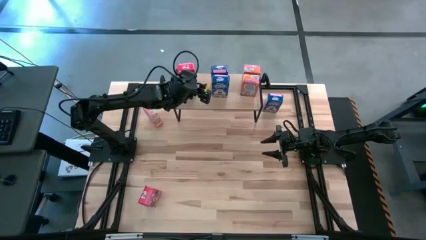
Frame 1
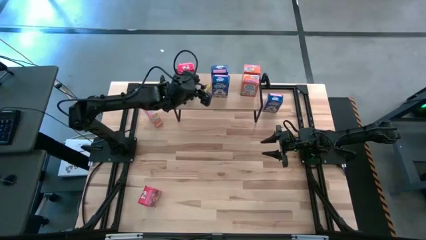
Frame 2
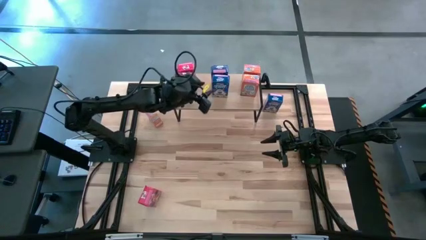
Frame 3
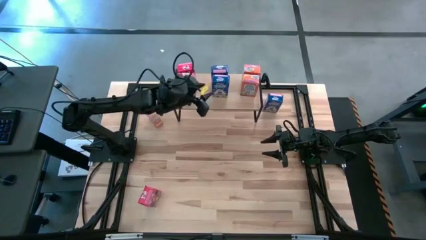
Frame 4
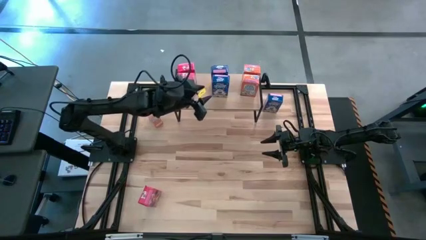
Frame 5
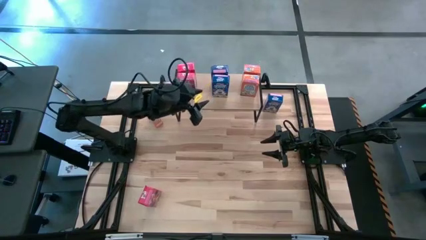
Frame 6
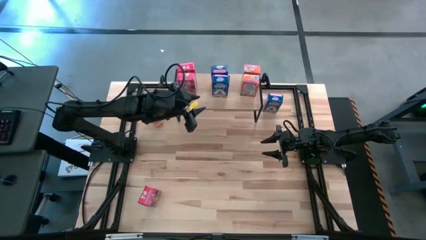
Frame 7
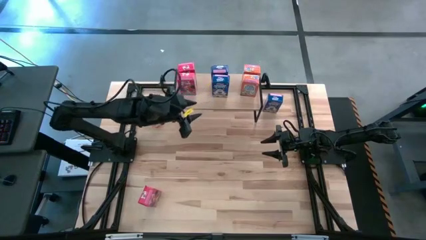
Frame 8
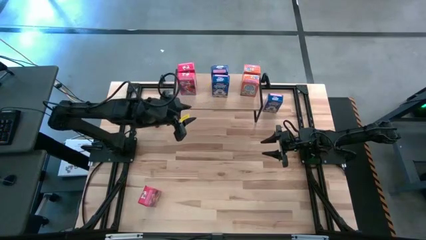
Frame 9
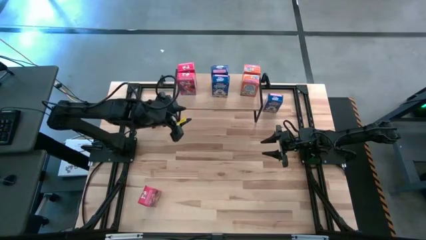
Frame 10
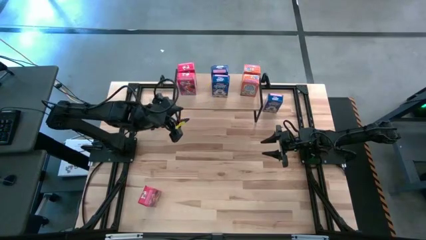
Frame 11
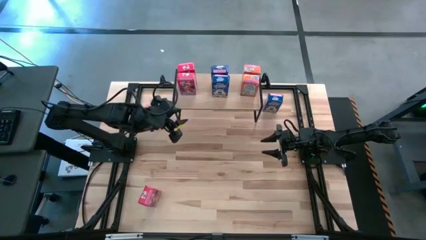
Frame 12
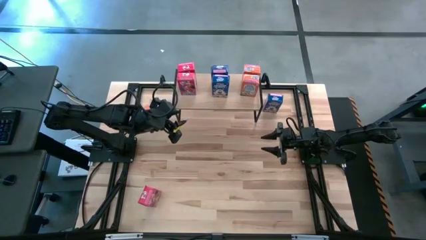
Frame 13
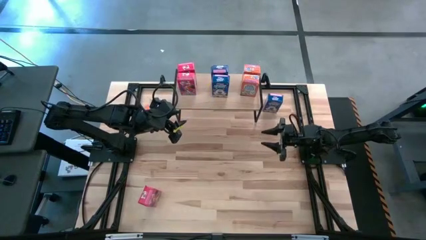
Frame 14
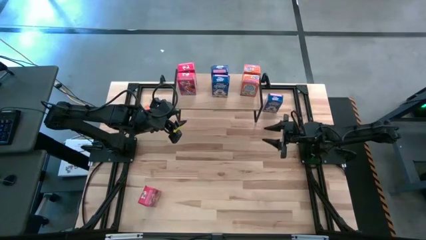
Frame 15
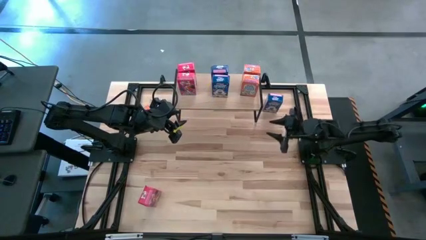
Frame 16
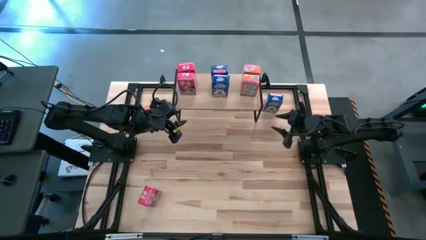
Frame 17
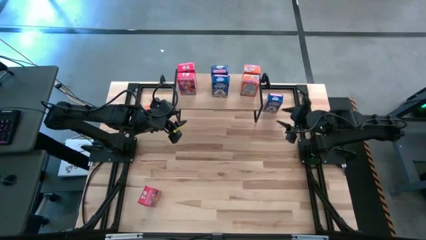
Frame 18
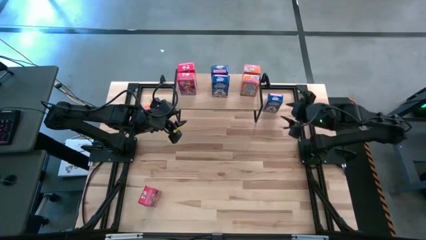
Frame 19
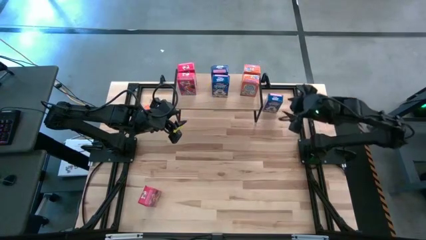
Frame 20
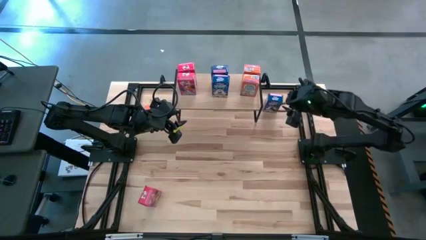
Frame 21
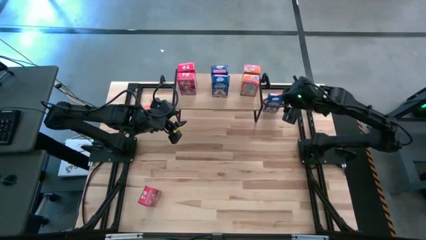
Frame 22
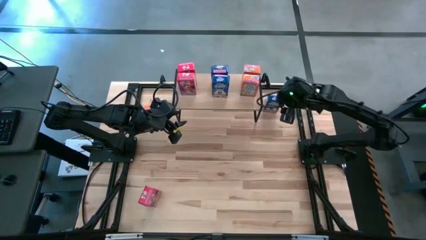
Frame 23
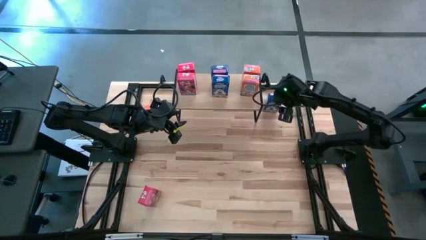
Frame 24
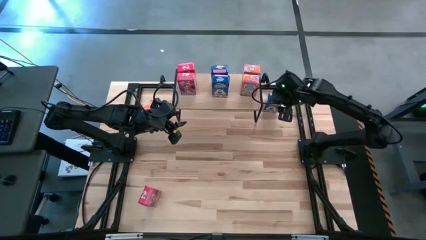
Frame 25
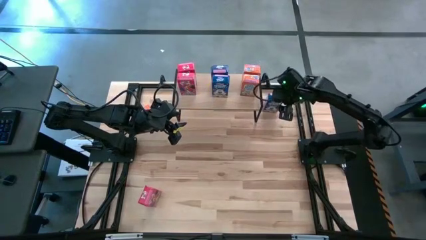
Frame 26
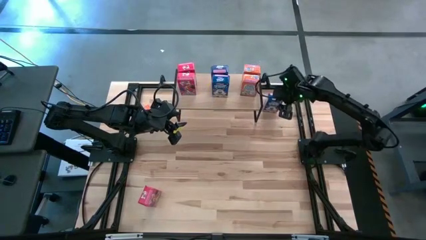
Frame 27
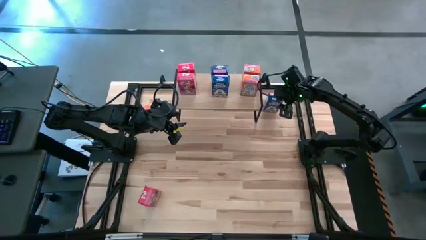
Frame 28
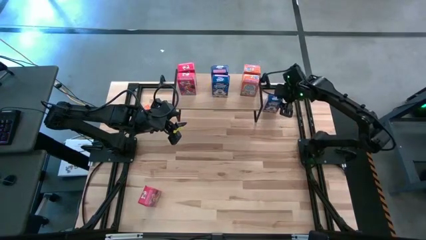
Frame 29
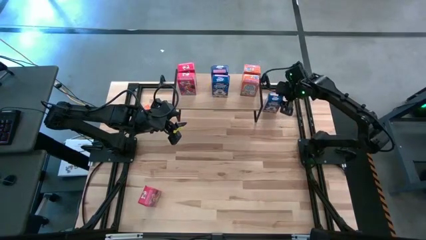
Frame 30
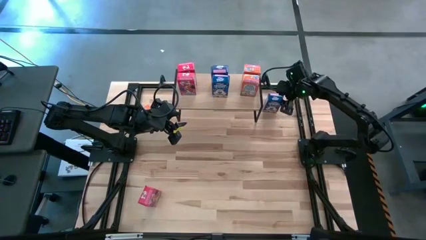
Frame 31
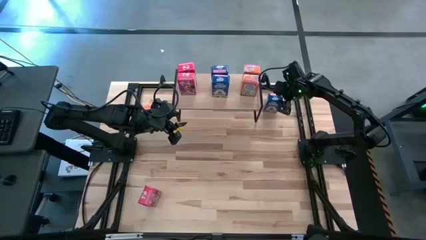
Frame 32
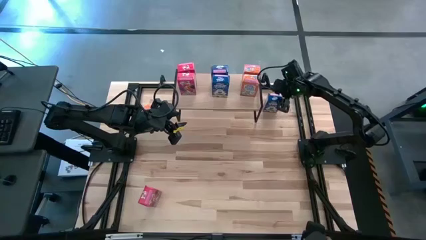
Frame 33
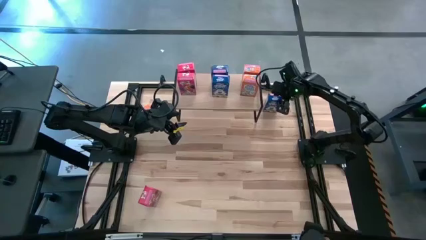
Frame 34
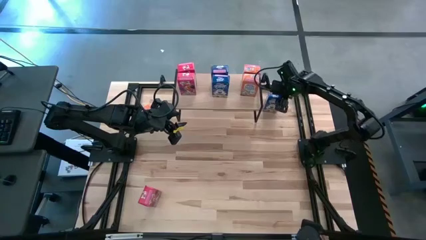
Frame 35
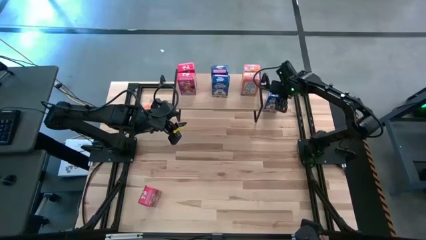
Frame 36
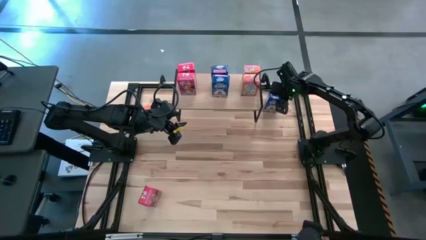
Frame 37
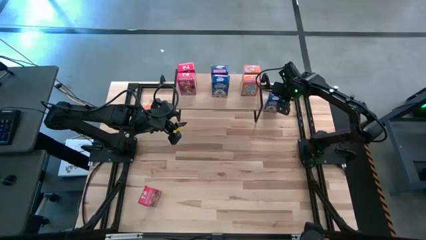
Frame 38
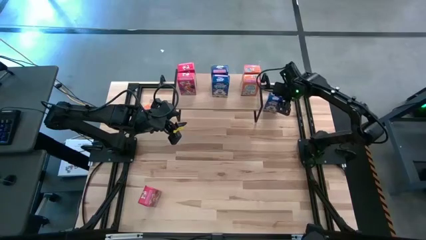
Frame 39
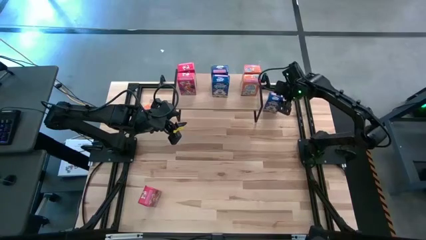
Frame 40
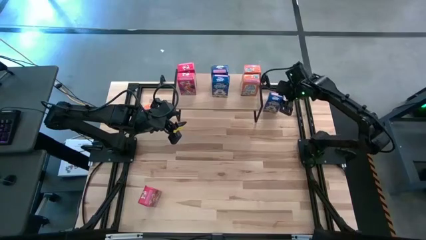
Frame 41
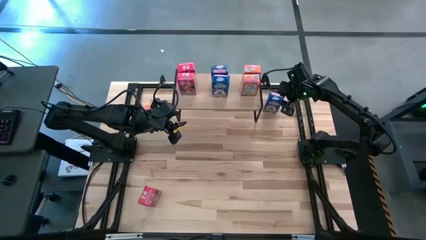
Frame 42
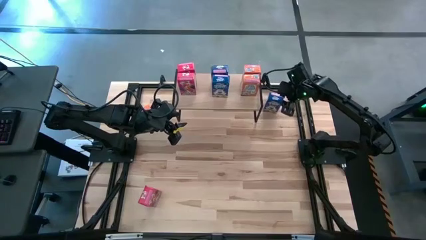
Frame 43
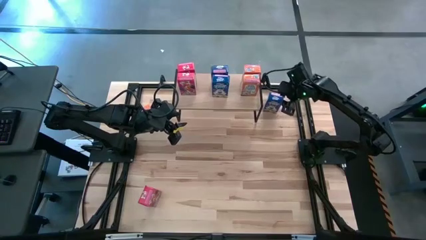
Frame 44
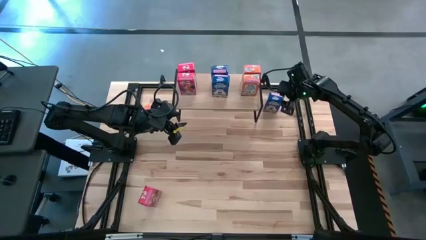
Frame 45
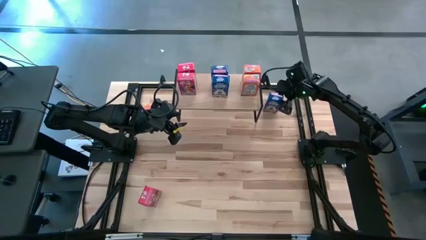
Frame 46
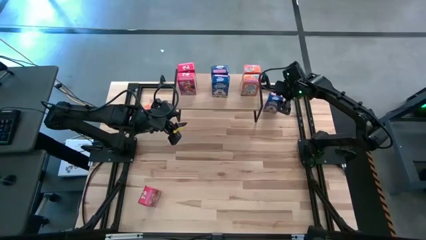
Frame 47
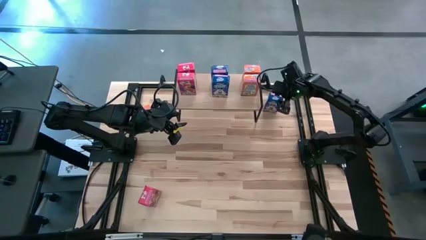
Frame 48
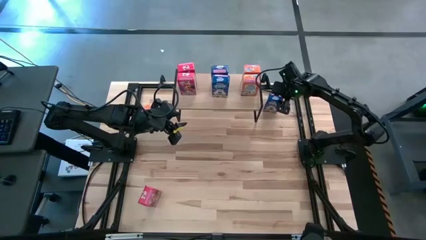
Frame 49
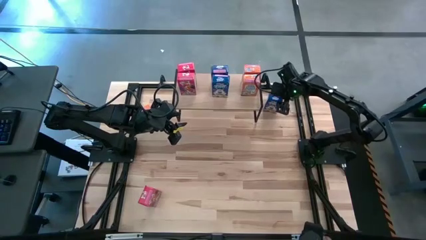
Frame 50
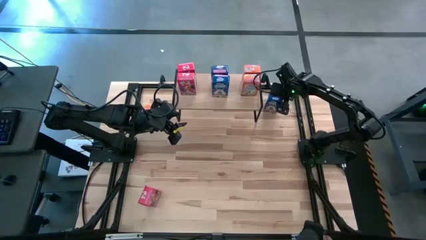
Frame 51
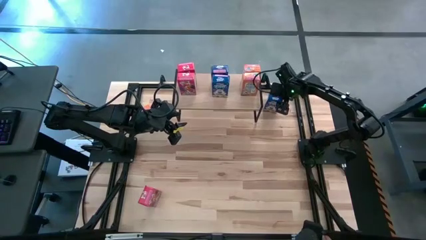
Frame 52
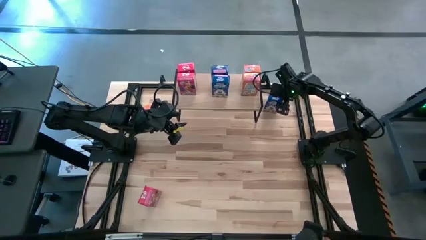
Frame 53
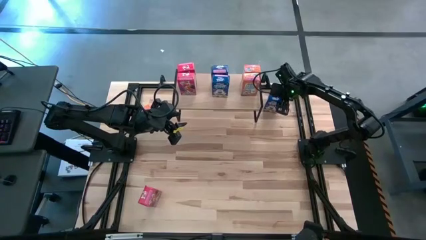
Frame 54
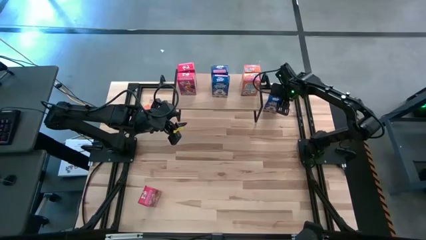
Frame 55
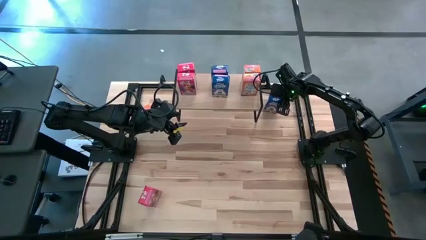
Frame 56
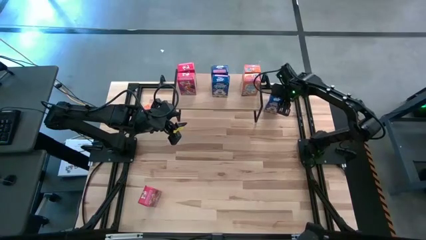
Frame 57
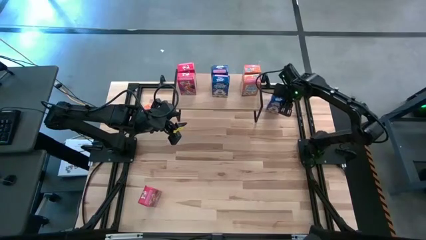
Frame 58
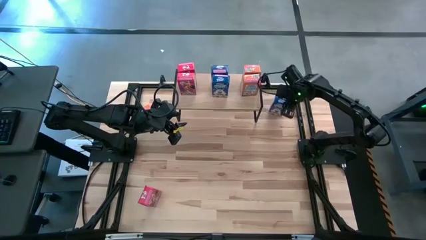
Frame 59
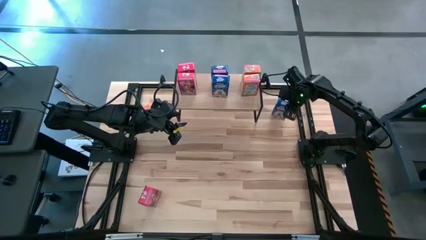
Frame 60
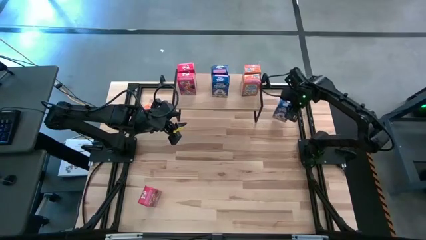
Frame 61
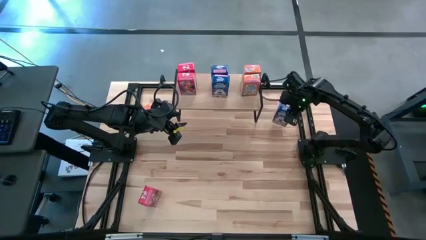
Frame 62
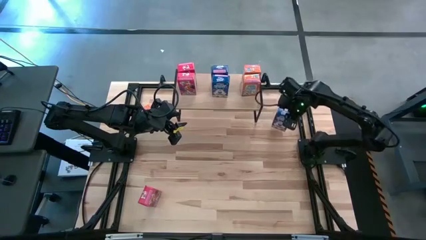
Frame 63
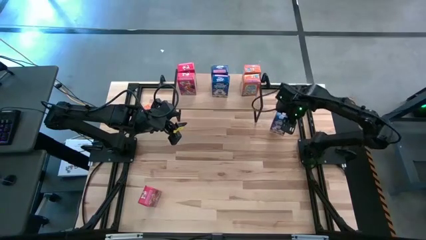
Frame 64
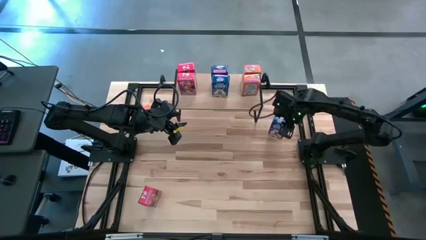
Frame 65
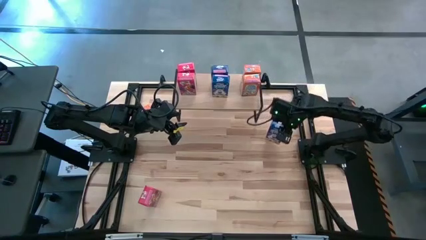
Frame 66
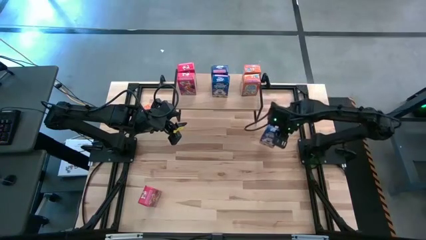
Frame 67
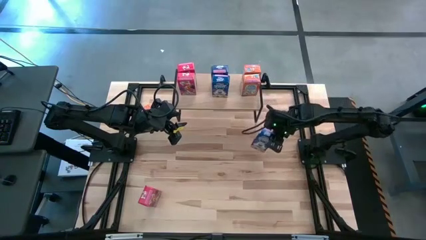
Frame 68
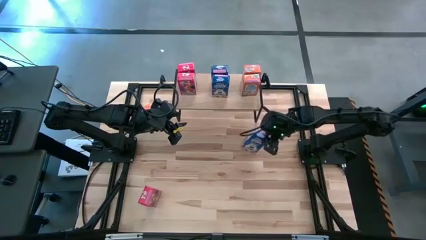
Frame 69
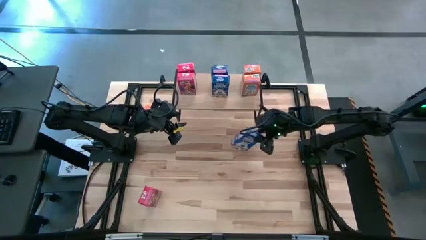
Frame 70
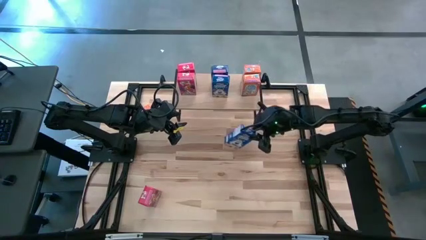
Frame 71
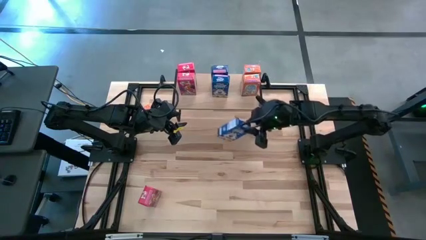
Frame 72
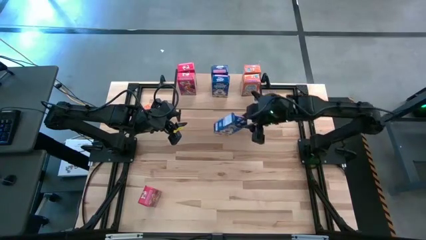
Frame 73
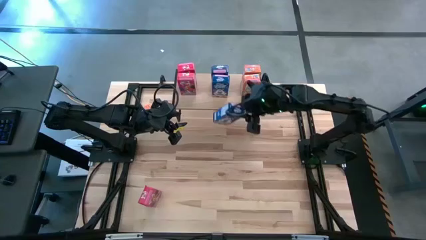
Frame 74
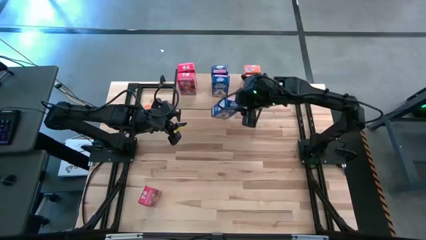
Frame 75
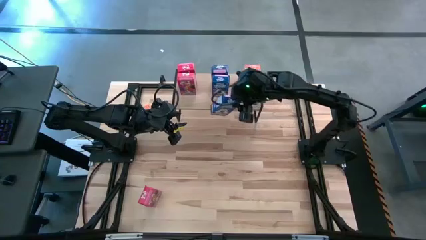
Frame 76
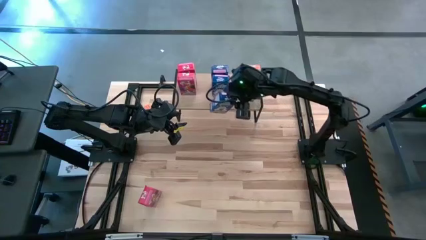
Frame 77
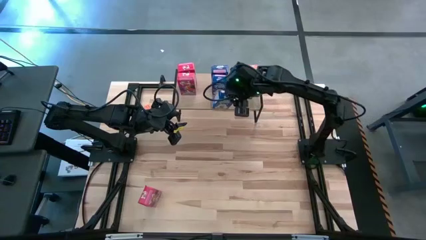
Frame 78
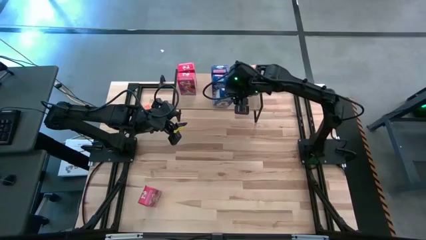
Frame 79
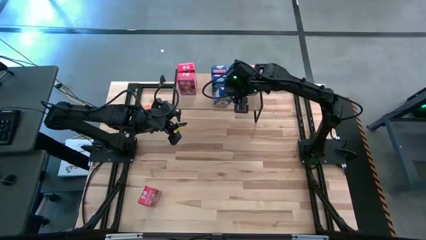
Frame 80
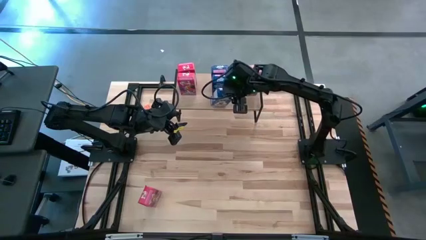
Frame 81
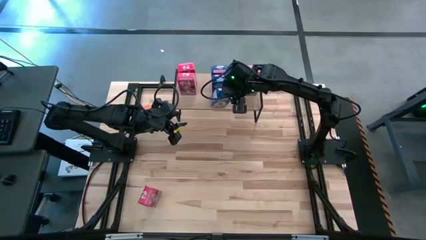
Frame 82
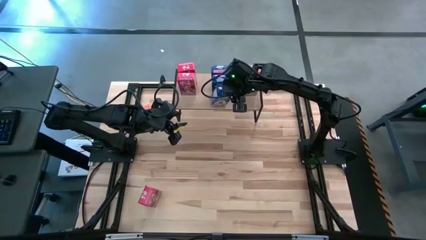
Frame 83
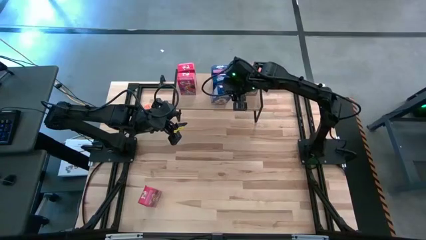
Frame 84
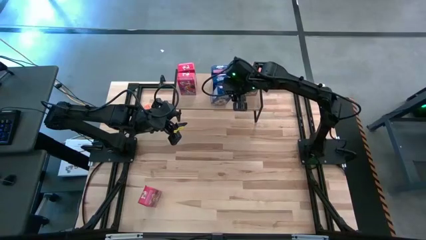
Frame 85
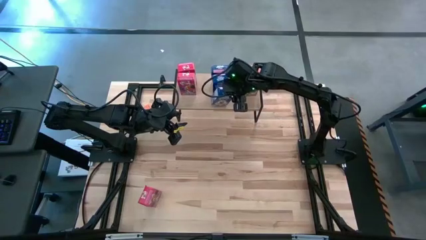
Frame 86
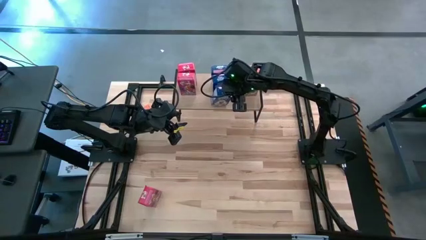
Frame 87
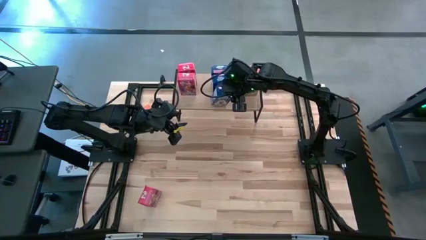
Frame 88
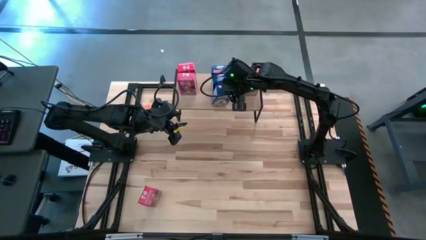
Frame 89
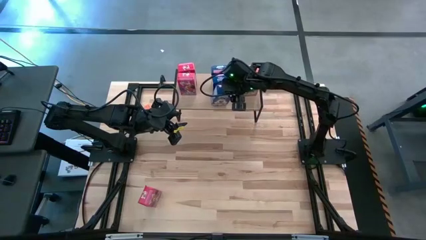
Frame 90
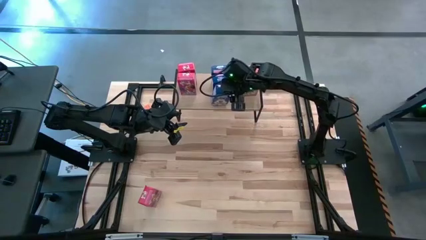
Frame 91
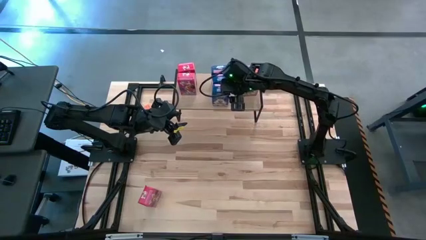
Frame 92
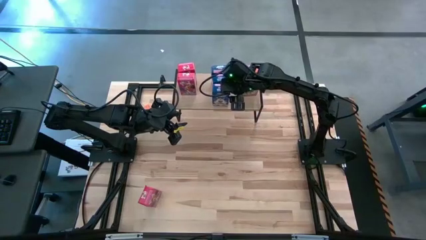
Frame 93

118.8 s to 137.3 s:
Task: Stack cereal on shelf
Put the blue cereal box on the shelf
